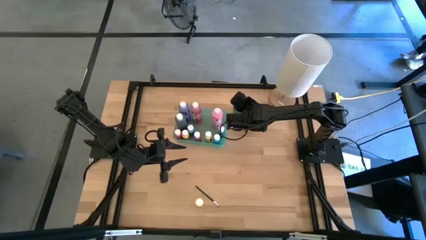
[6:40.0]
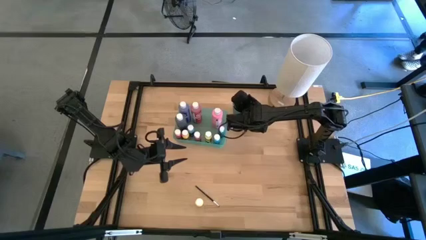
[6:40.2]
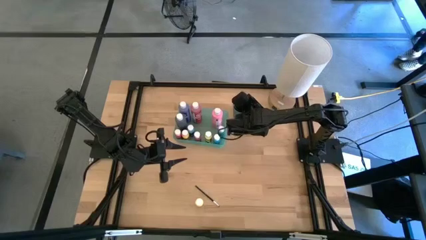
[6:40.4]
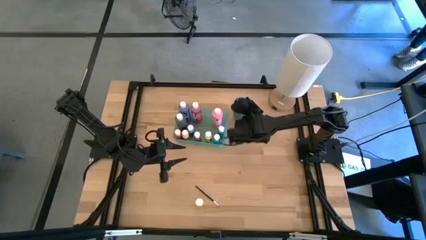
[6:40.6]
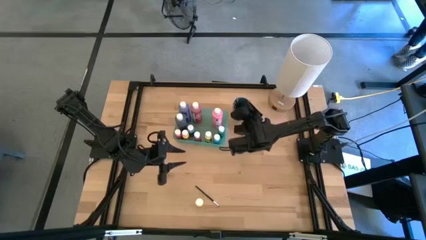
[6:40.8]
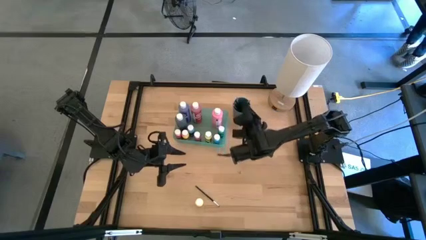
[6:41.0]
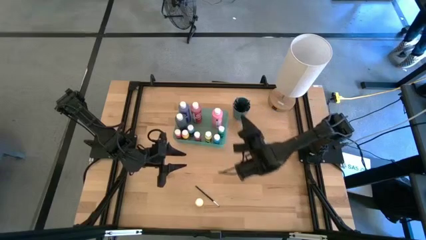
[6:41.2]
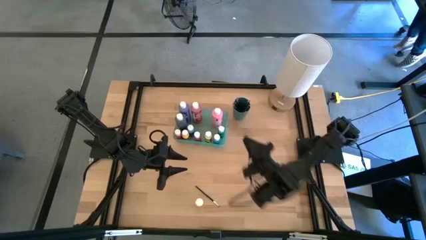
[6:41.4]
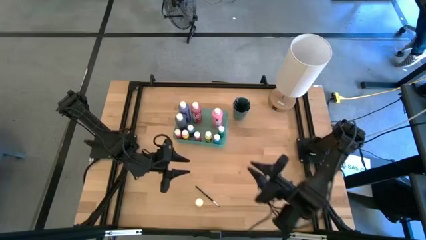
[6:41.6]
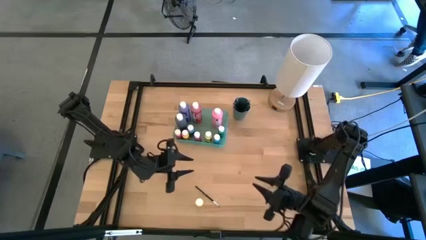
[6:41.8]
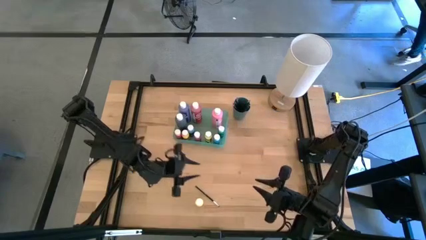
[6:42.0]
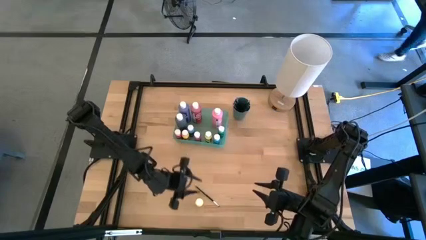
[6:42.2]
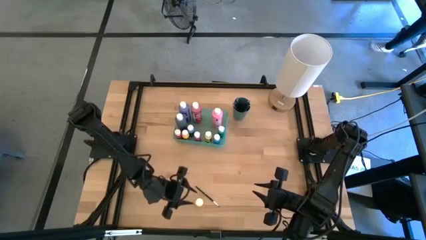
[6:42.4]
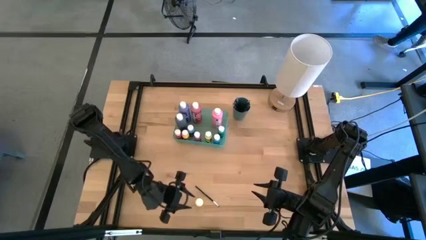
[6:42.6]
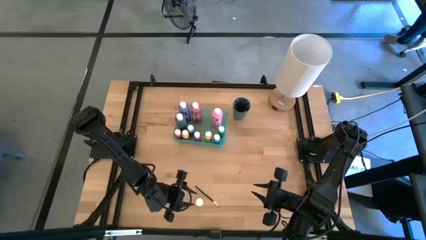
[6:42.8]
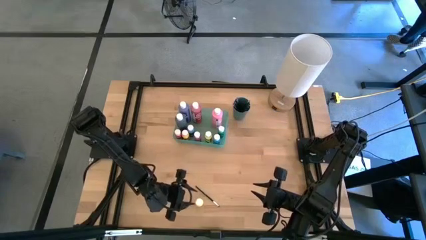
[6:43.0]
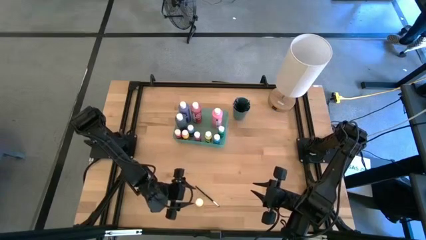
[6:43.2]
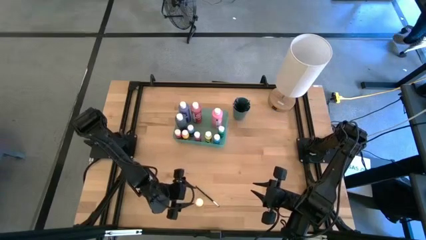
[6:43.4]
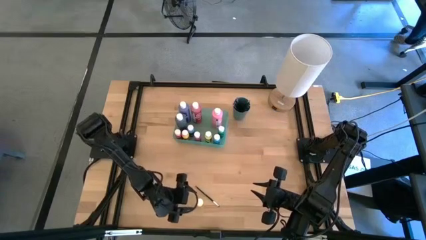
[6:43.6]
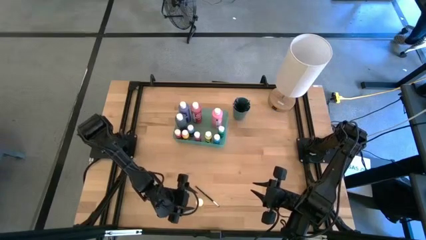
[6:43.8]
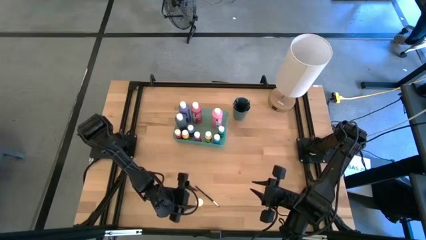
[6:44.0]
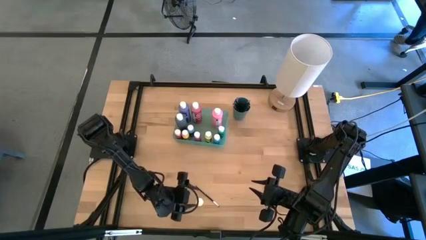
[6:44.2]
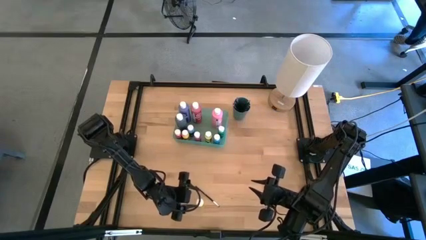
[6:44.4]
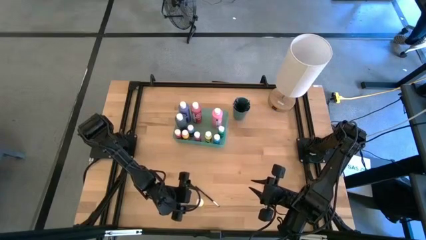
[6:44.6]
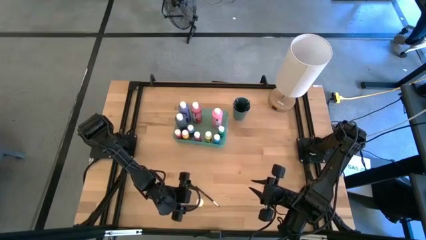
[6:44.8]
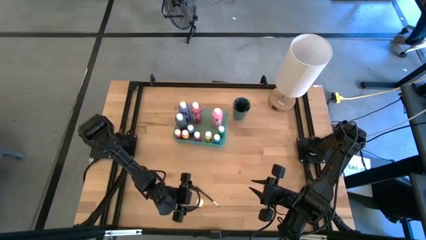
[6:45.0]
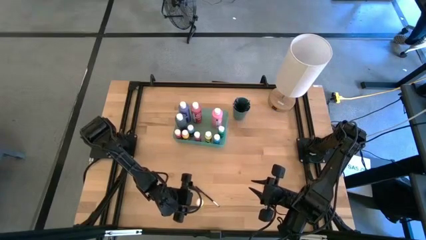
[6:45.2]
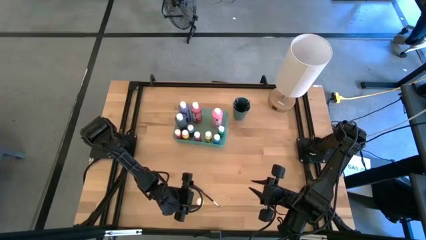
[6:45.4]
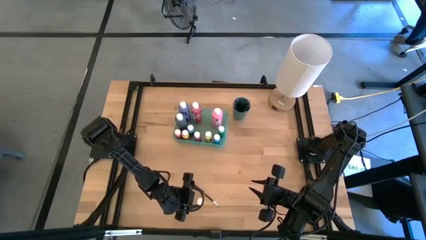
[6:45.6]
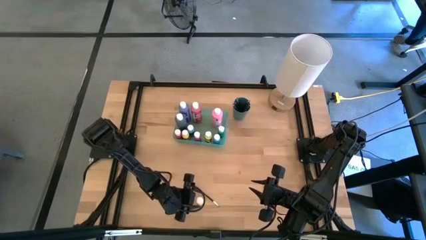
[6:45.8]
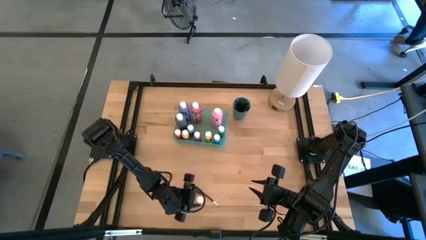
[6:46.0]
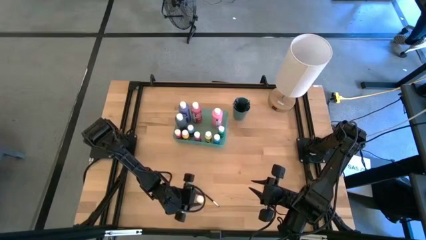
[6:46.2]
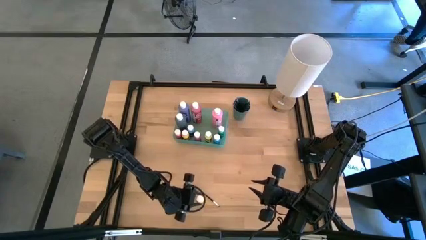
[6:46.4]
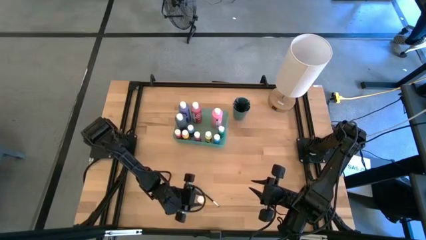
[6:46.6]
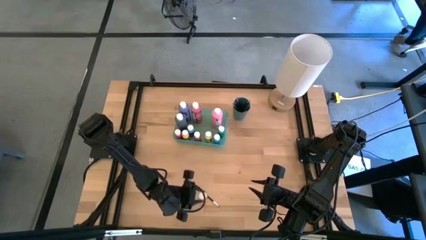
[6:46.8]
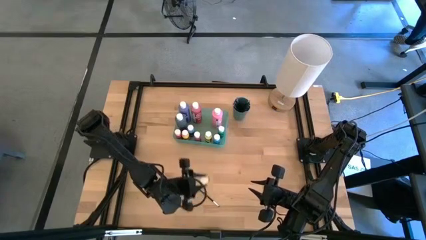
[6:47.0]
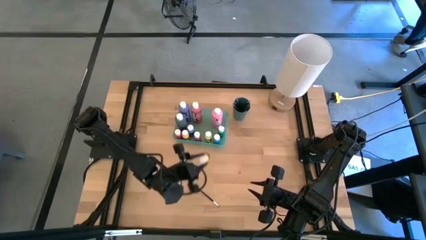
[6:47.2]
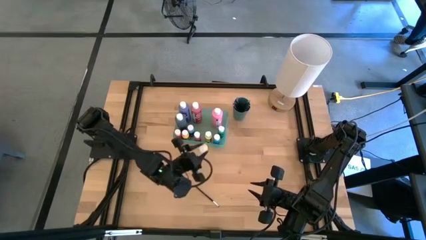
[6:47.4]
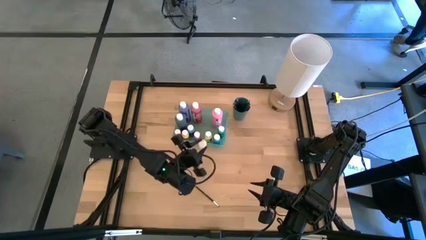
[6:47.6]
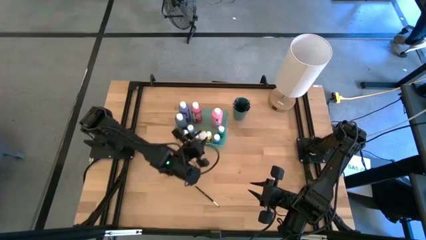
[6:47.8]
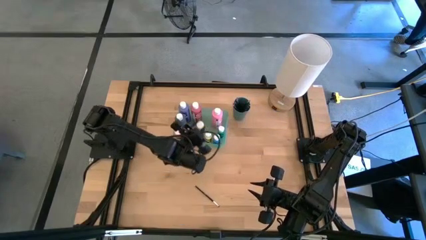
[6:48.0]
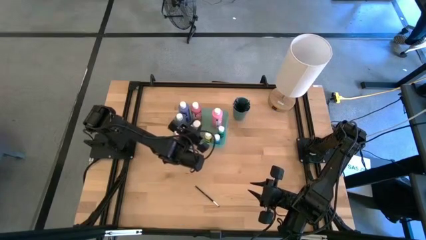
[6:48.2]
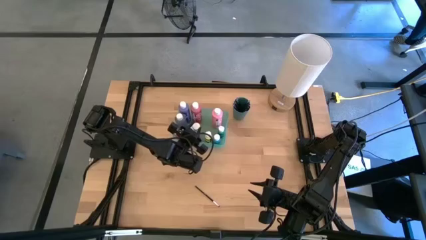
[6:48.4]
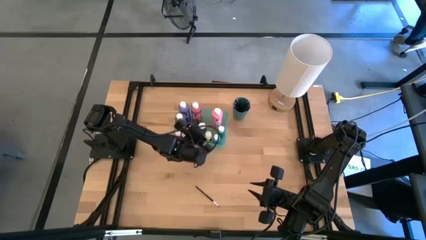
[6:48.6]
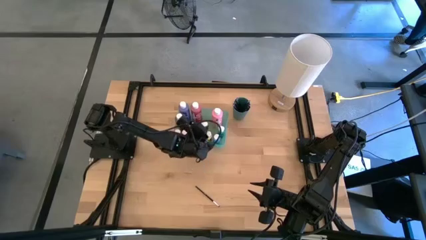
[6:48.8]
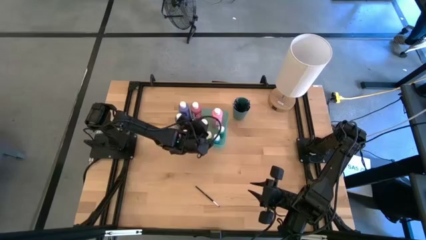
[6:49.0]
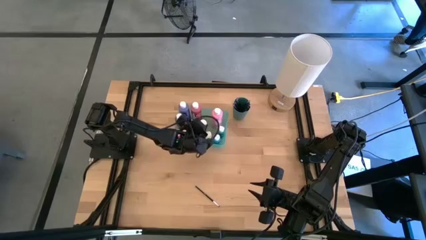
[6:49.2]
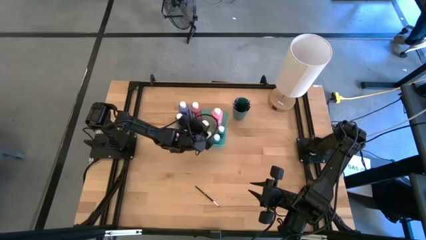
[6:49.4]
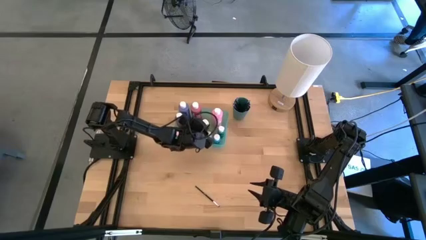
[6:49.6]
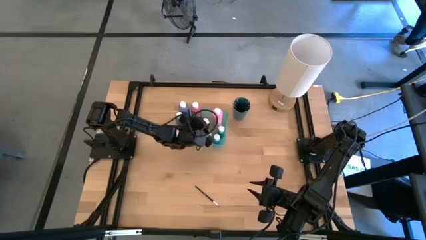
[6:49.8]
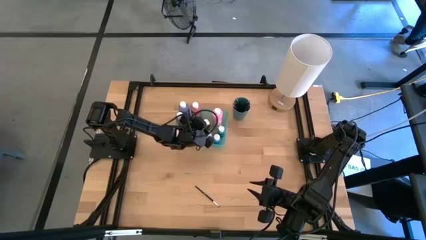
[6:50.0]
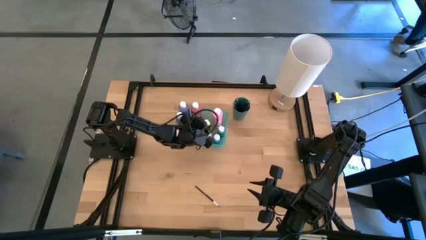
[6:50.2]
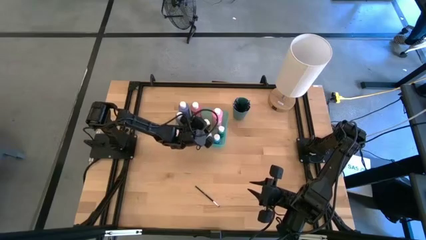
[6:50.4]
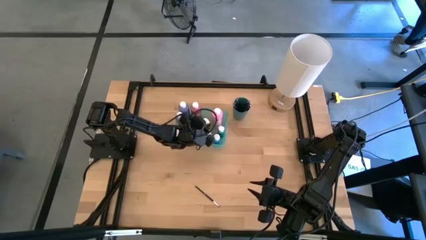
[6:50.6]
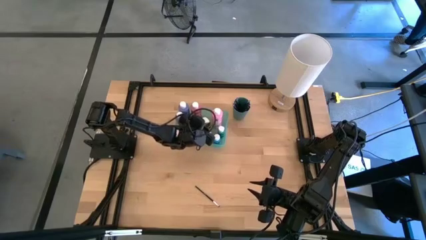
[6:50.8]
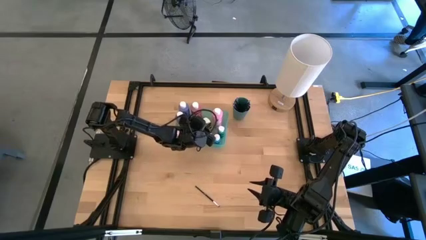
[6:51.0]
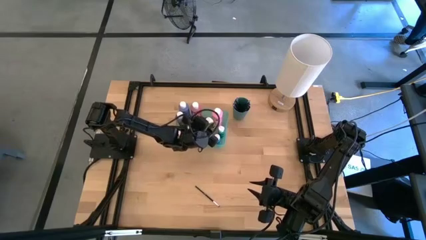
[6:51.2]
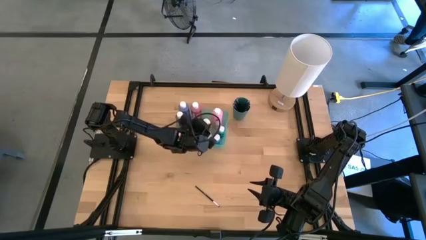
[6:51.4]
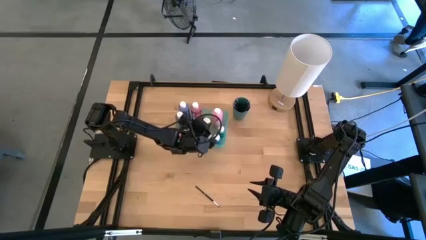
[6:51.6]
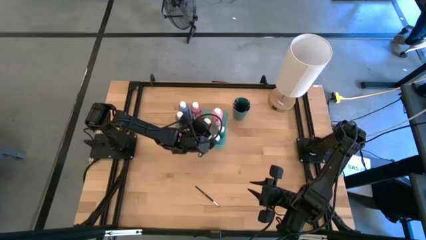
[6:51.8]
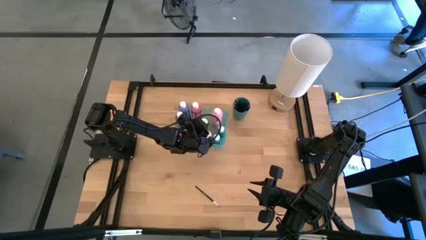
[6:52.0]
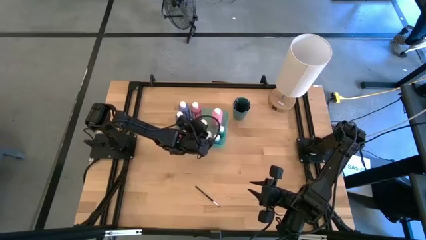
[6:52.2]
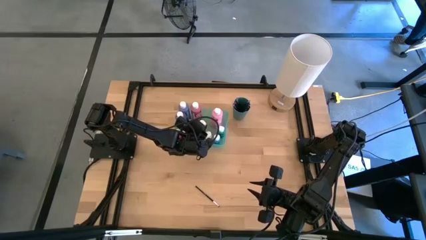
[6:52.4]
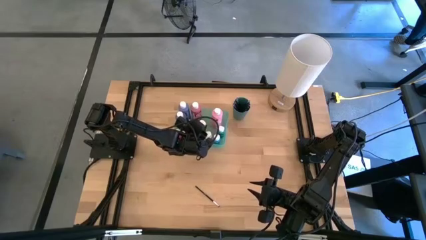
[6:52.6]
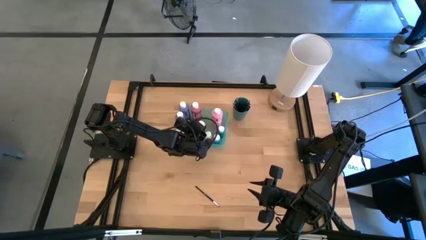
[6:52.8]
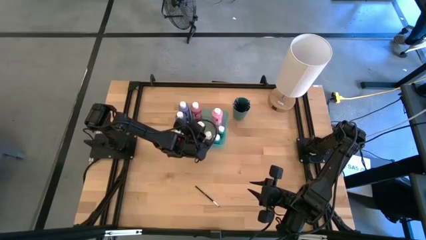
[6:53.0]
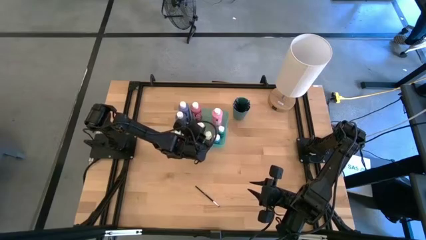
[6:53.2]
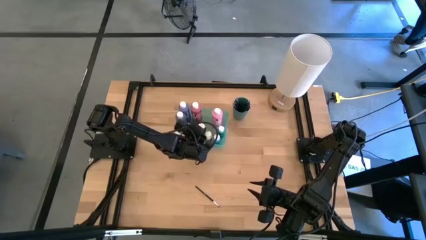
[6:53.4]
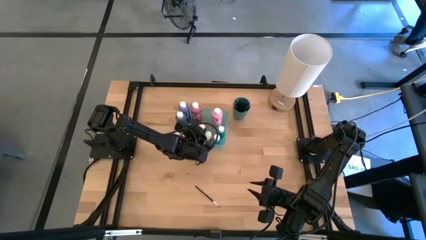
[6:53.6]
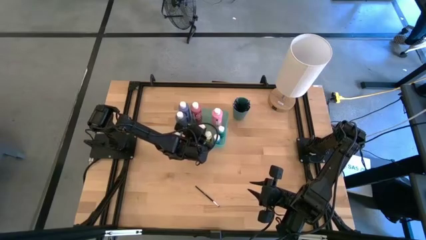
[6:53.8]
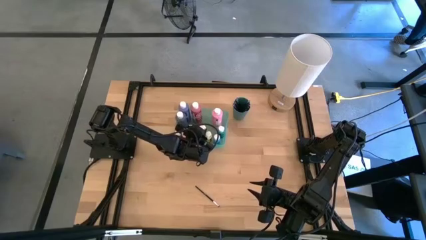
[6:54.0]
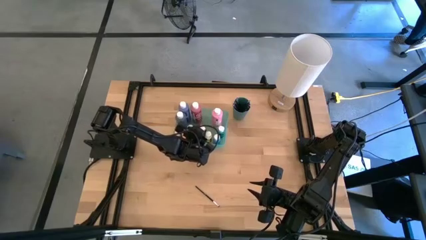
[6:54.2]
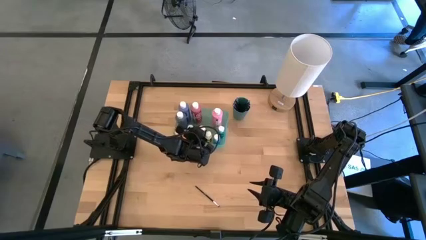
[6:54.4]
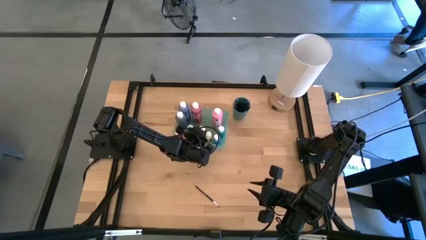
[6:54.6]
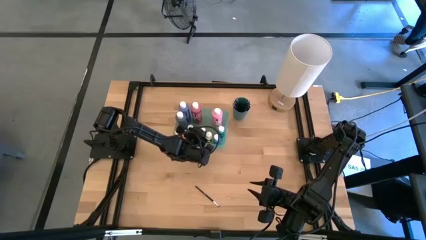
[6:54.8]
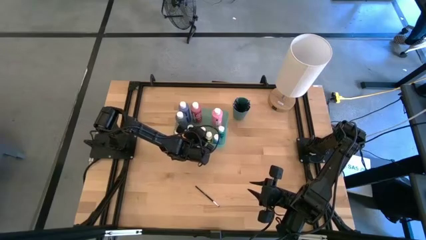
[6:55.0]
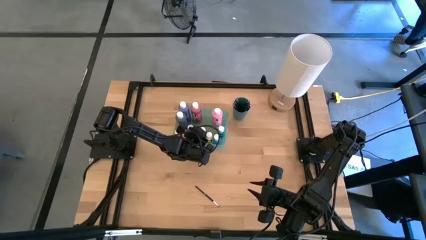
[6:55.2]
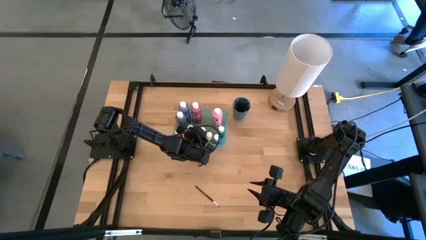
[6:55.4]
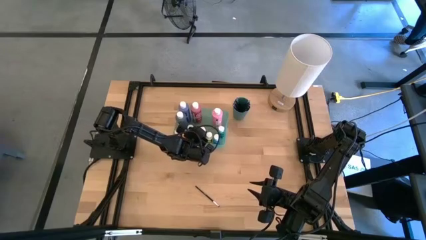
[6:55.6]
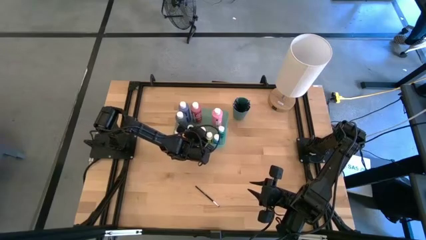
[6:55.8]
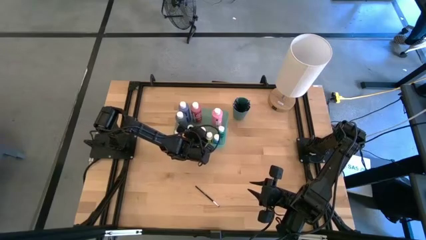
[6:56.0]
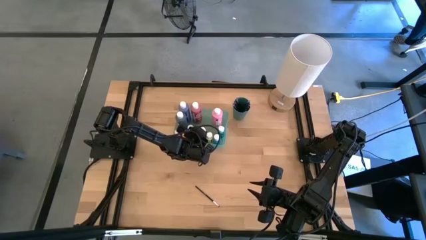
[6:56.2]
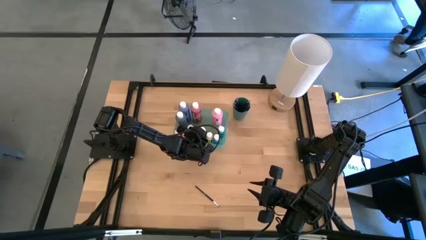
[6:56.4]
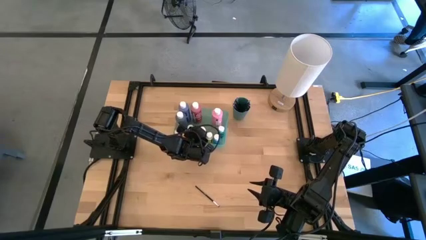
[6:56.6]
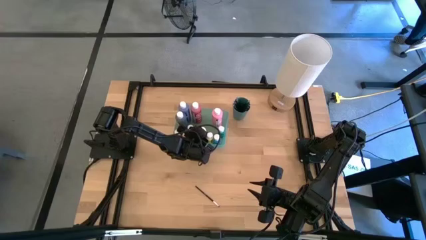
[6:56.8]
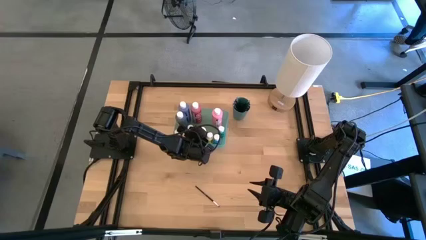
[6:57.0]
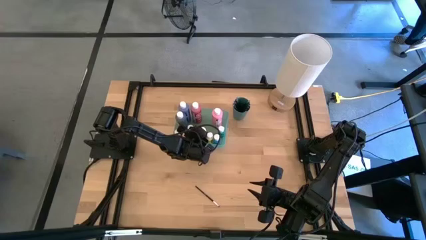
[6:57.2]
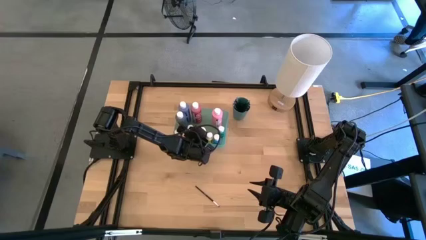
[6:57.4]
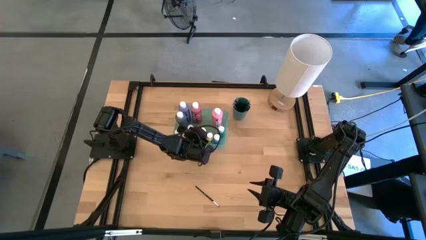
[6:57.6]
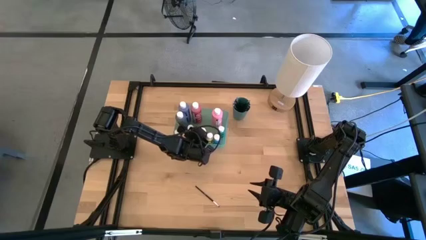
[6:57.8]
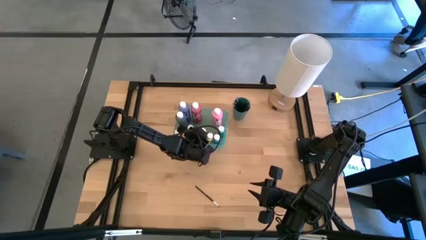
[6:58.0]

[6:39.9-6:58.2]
Task: Pick & Place Paint Supplies
Put the small yellow bottle into the green bin
